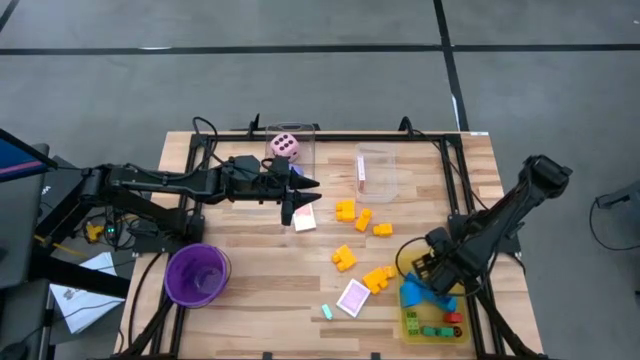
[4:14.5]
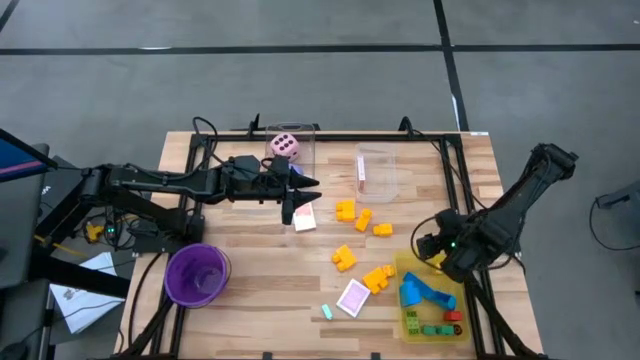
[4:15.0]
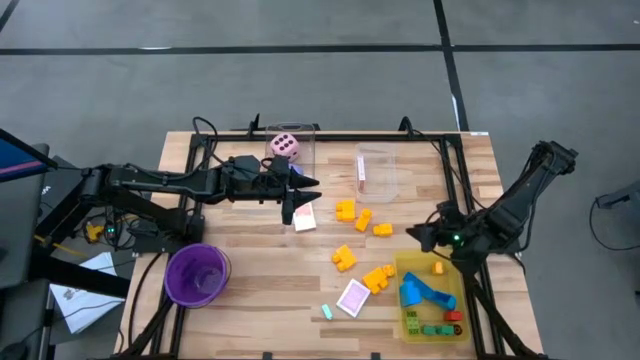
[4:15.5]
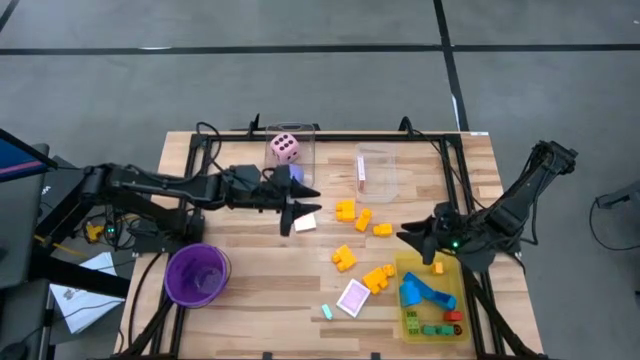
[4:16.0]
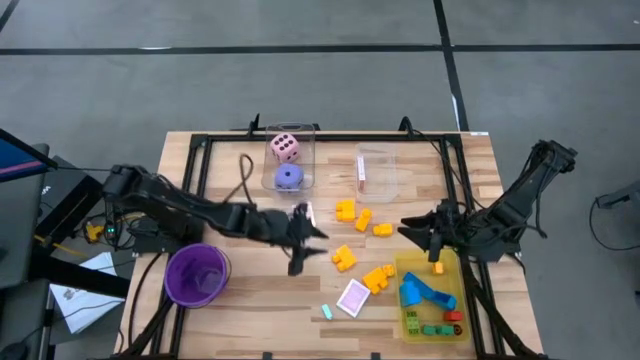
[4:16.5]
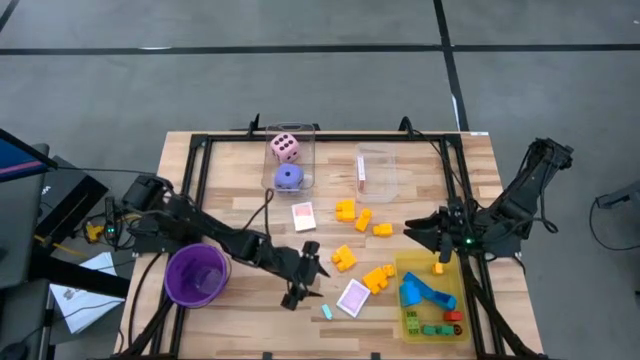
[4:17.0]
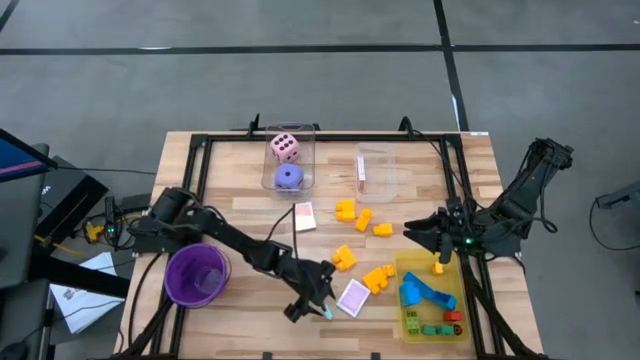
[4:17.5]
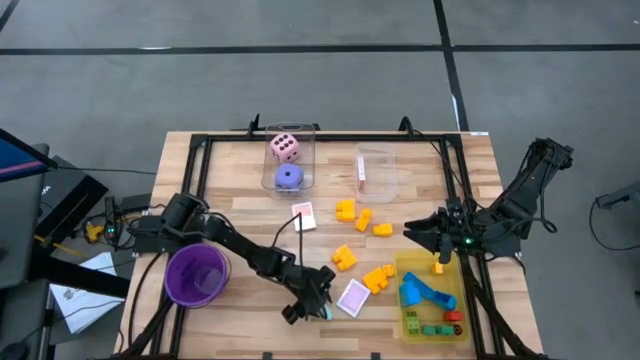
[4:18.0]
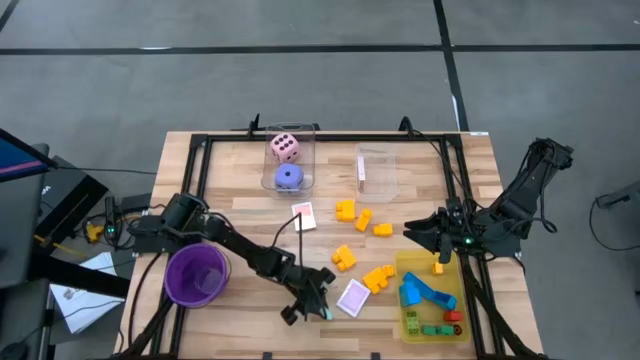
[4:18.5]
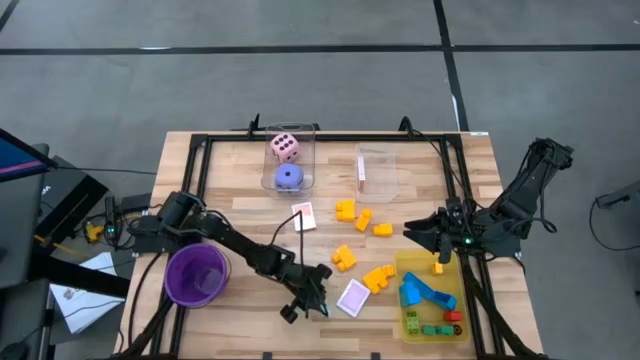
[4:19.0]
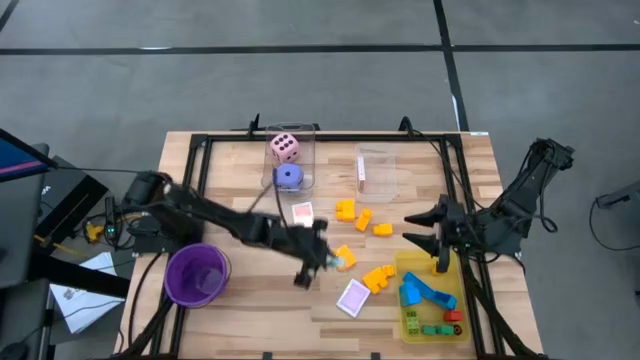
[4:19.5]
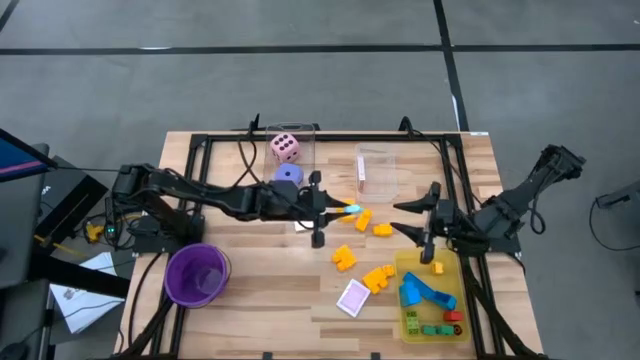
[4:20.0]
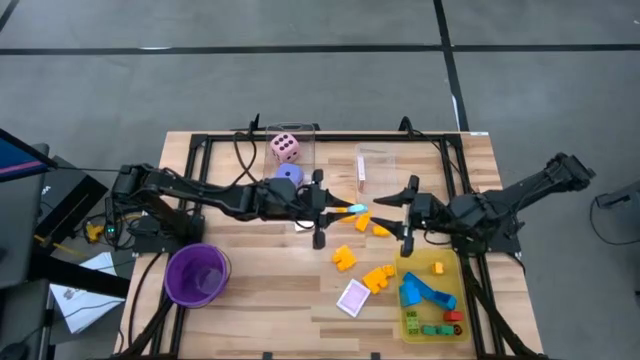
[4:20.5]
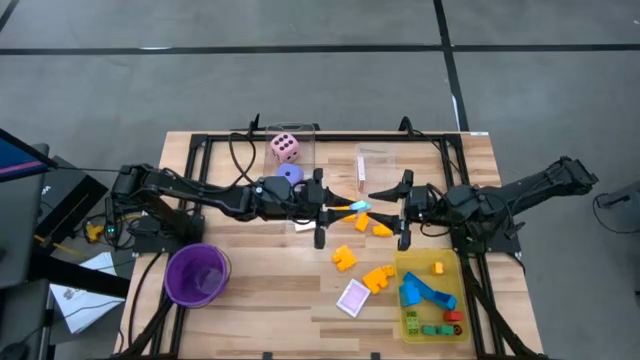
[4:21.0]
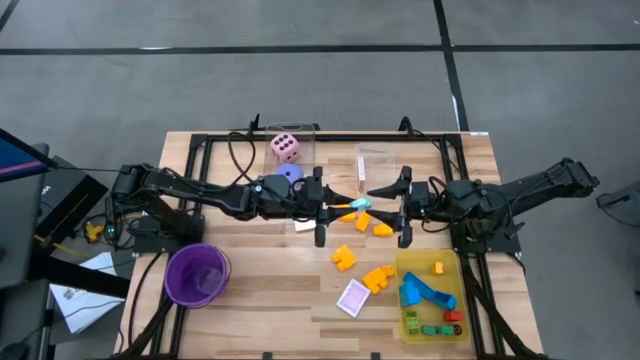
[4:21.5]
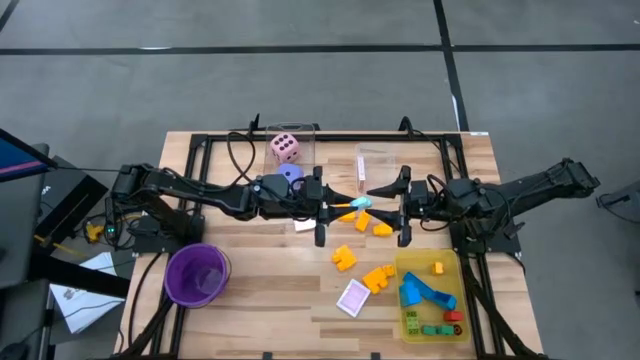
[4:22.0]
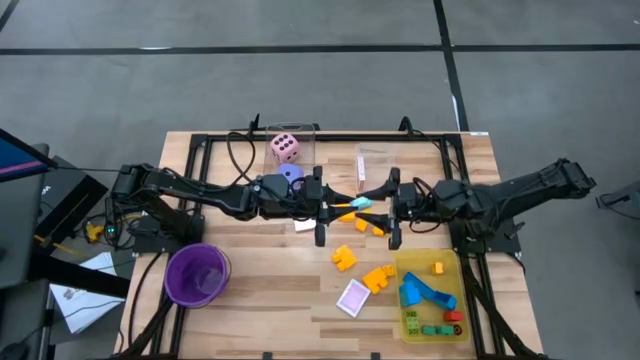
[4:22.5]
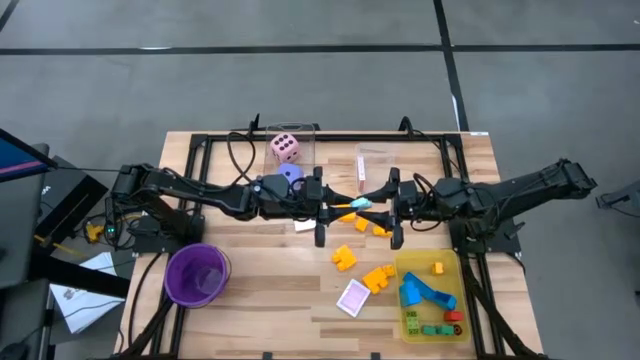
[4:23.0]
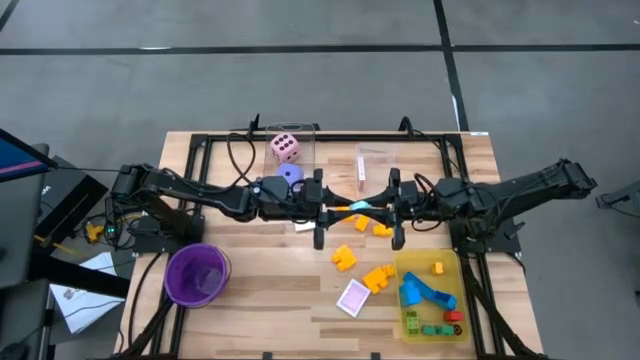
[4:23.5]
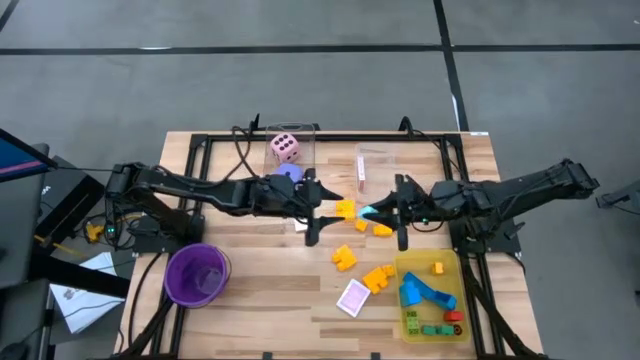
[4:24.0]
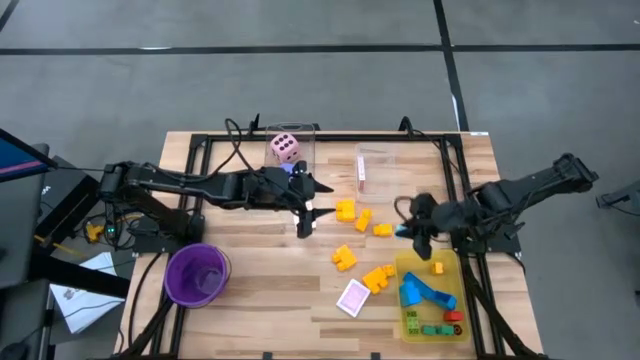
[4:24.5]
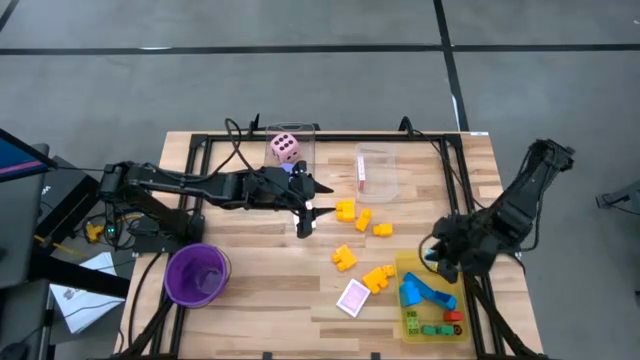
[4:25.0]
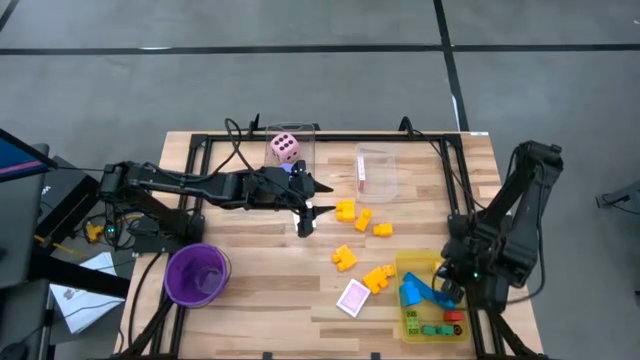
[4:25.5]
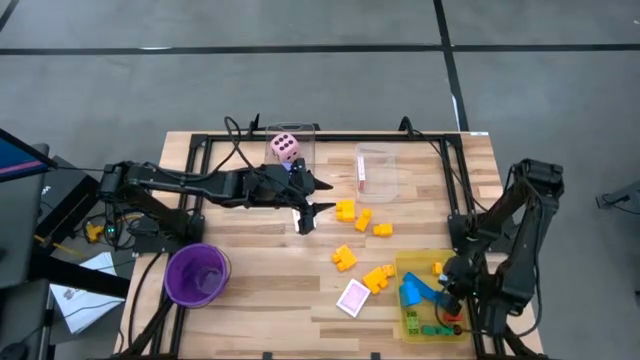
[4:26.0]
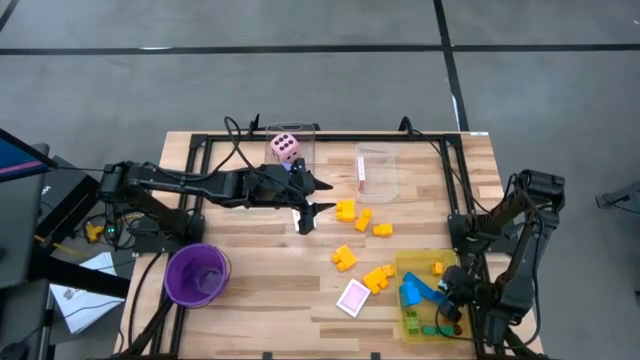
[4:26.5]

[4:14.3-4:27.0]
Task: Pick & Place Toys
Put the light blue game piece into the bin

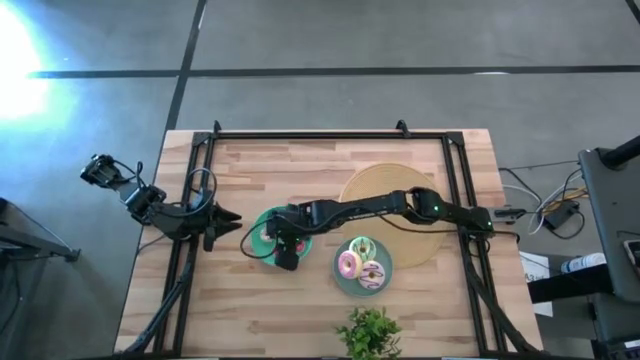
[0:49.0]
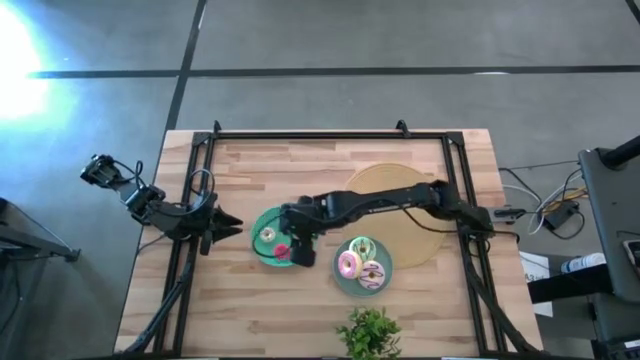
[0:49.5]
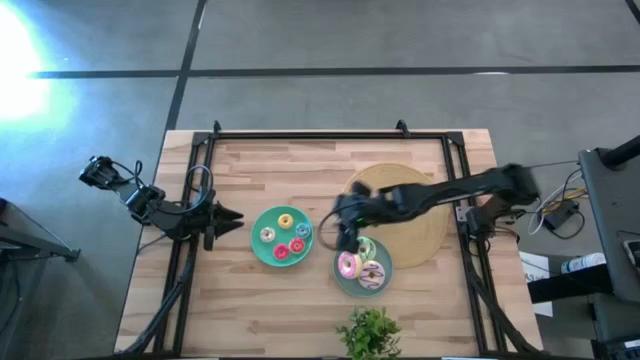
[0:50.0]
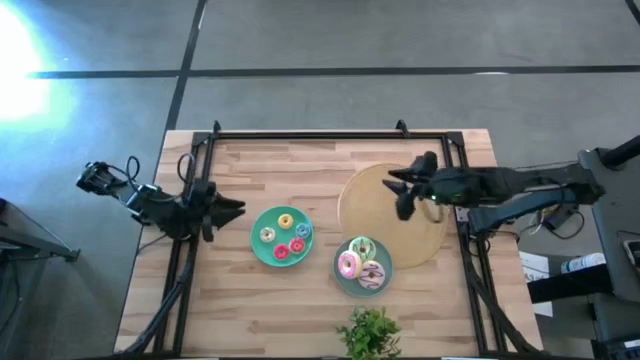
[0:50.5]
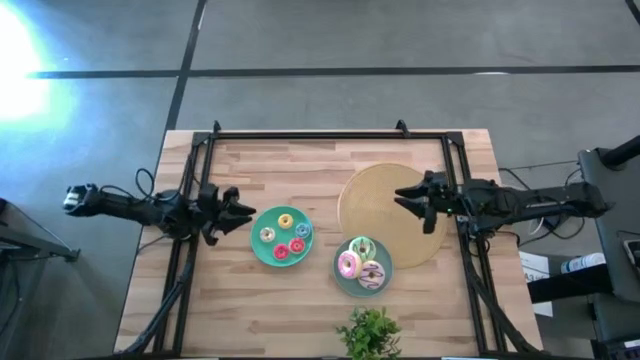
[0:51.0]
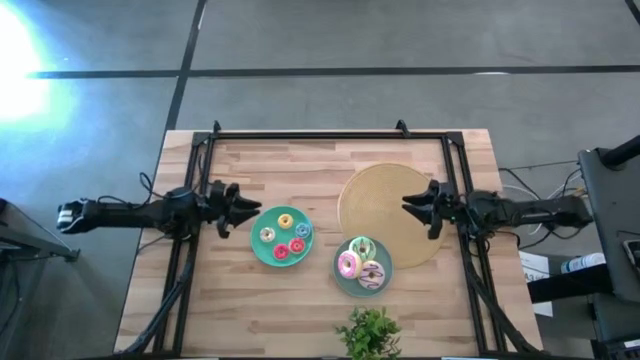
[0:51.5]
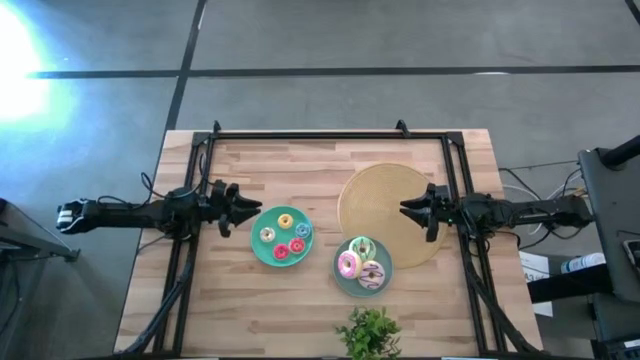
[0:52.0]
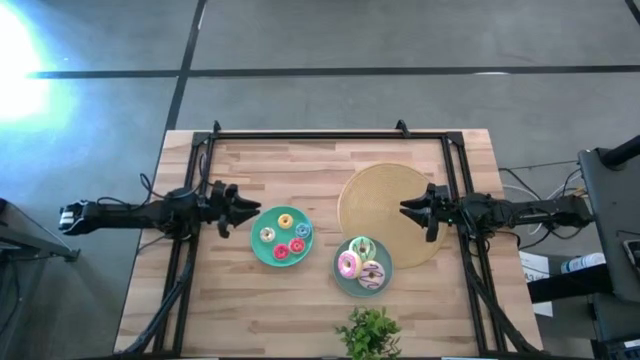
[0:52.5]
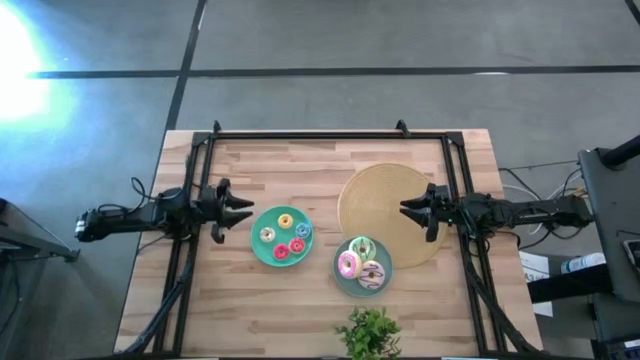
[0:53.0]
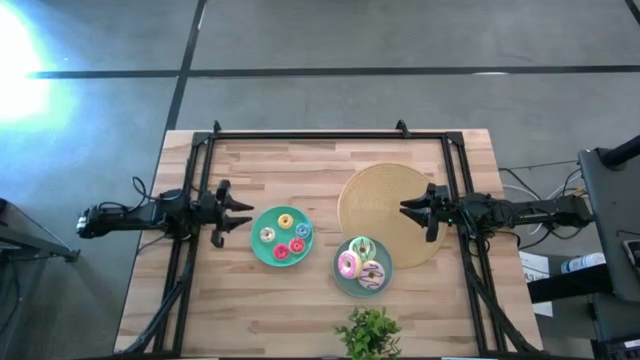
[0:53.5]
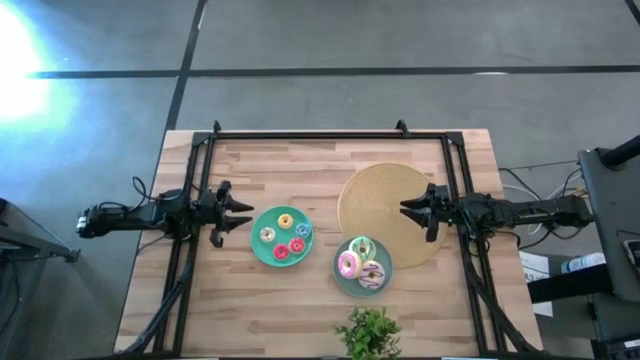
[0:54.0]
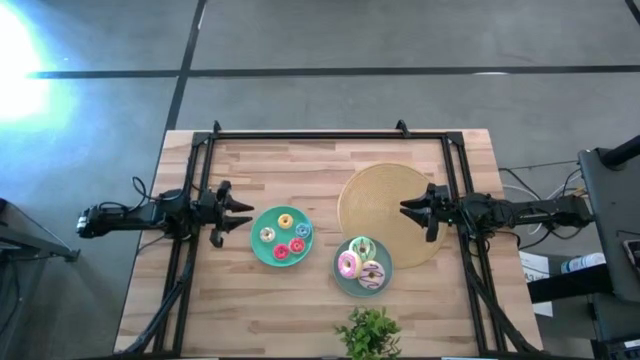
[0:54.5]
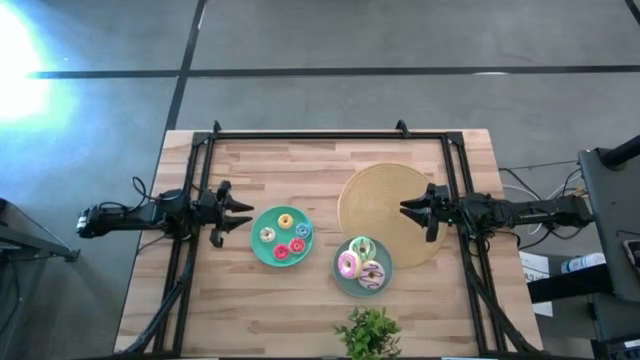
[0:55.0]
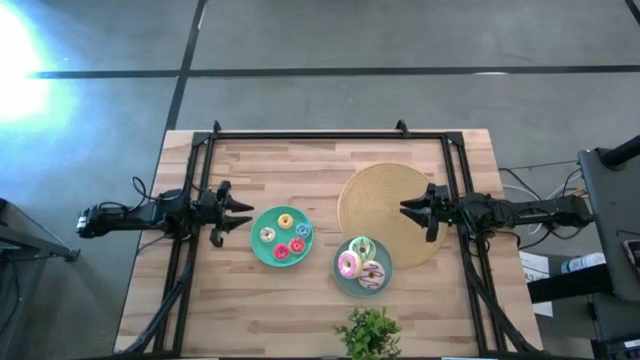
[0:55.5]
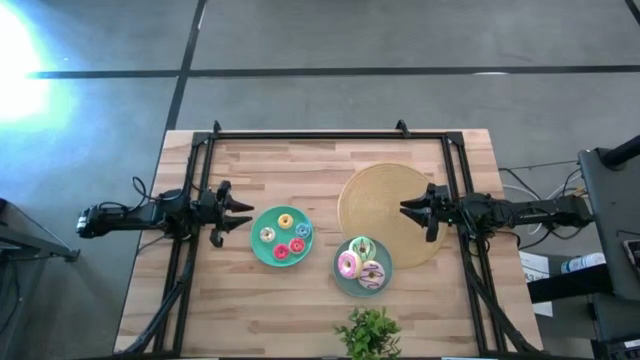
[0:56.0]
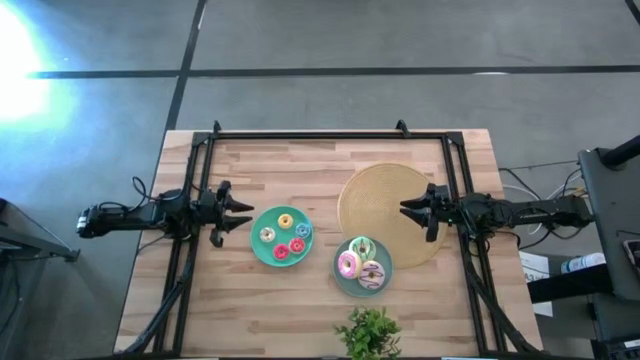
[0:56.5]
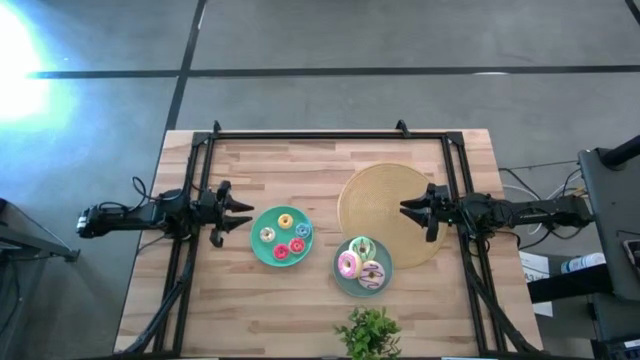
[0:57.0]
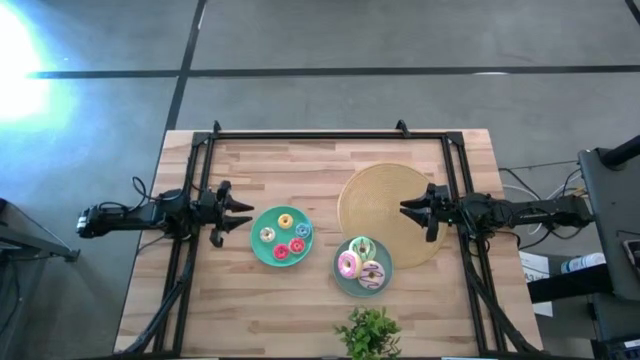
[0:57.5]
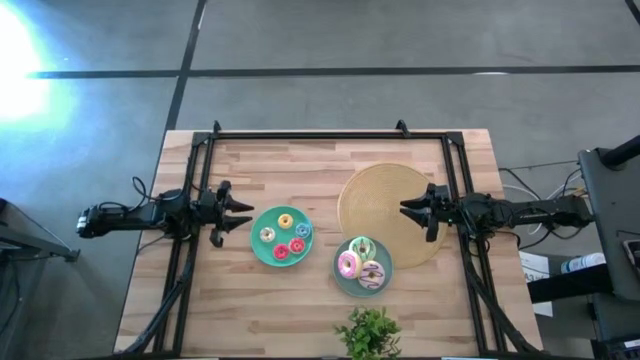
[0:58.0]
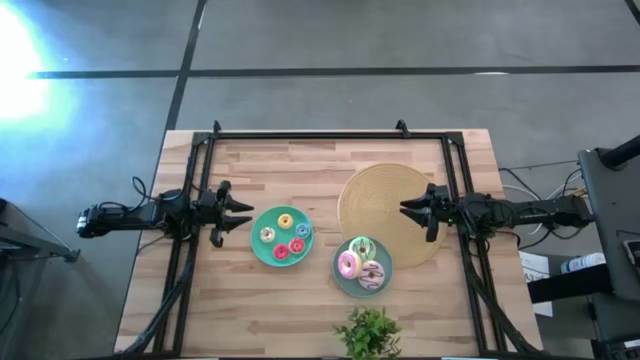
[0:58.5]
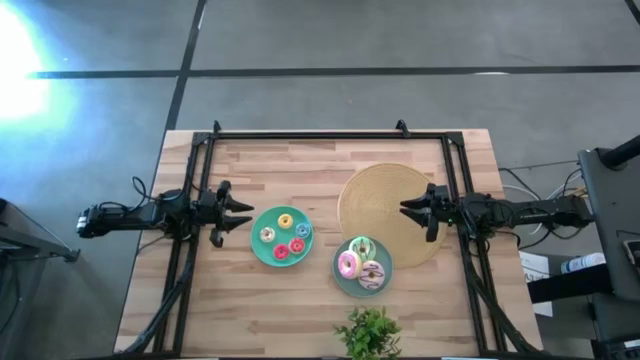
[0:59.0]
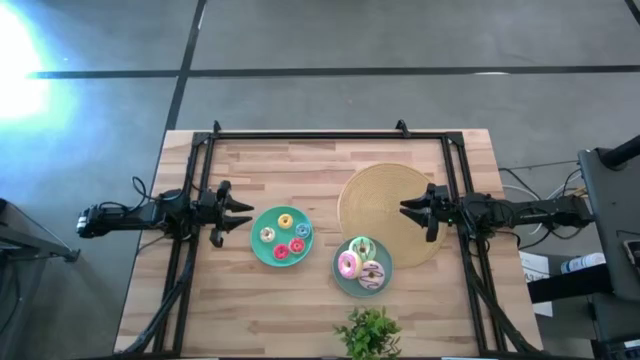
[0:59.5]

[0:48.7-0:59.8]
Task: Pick & Place donuts
Return to Home Position
